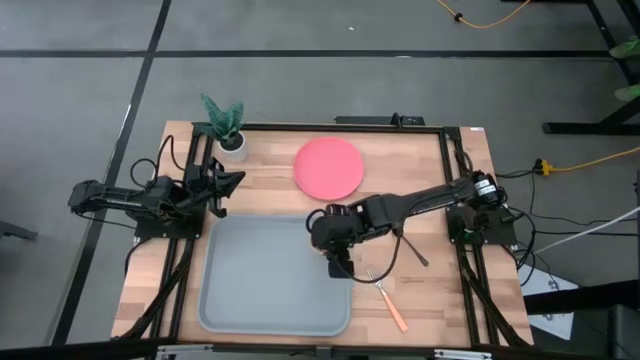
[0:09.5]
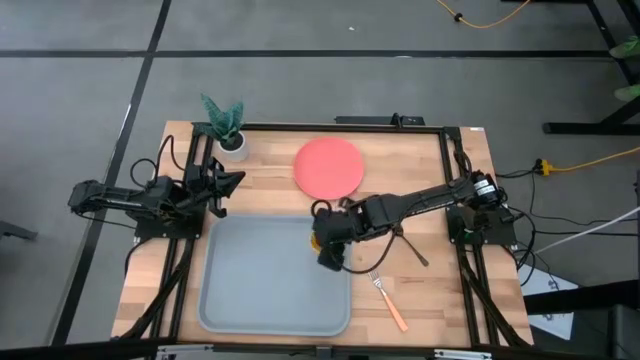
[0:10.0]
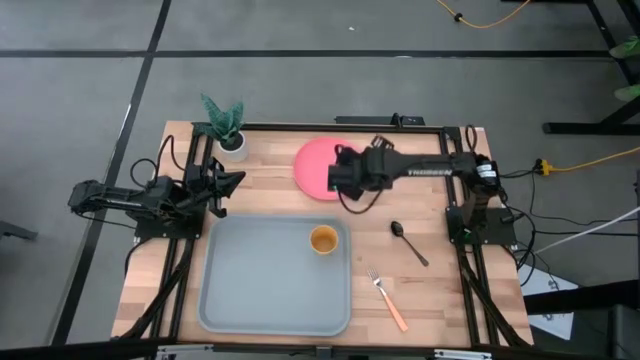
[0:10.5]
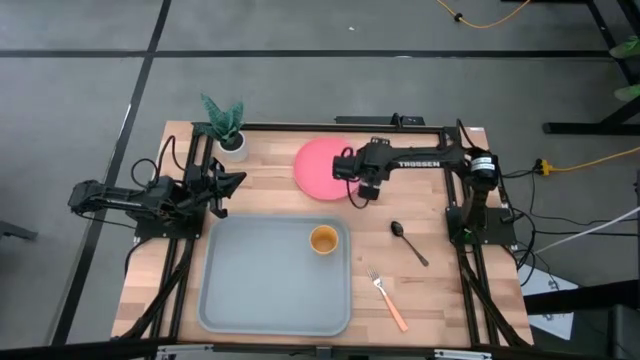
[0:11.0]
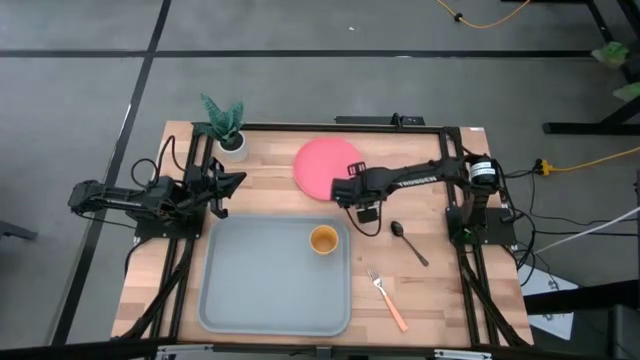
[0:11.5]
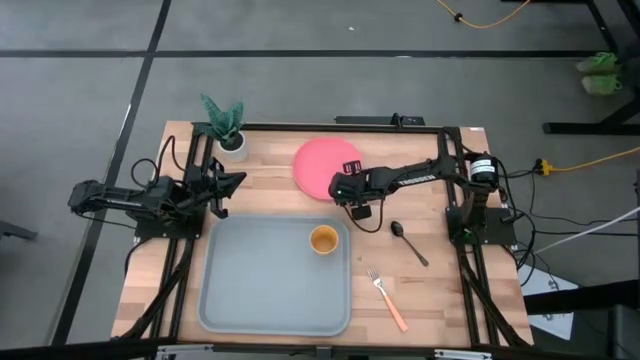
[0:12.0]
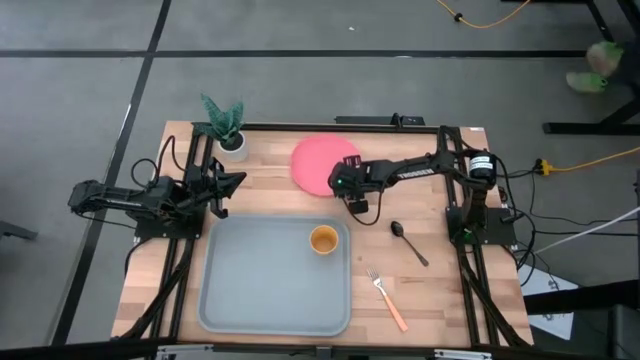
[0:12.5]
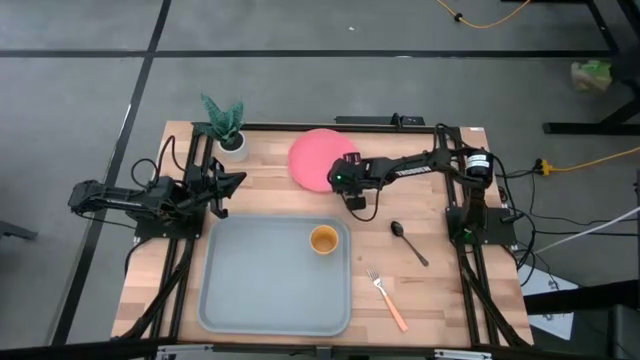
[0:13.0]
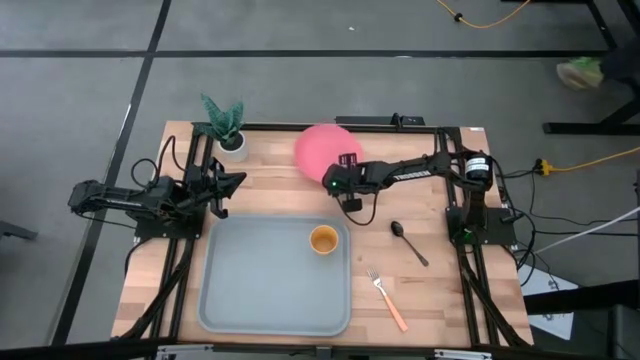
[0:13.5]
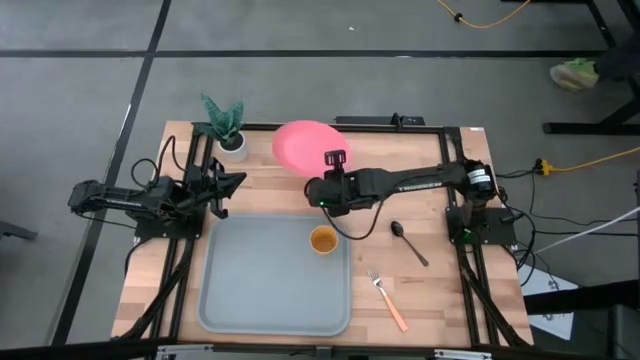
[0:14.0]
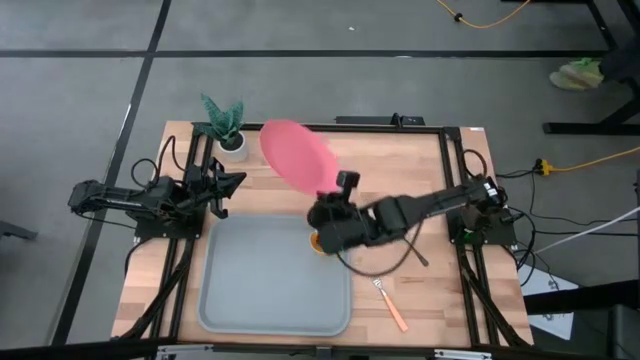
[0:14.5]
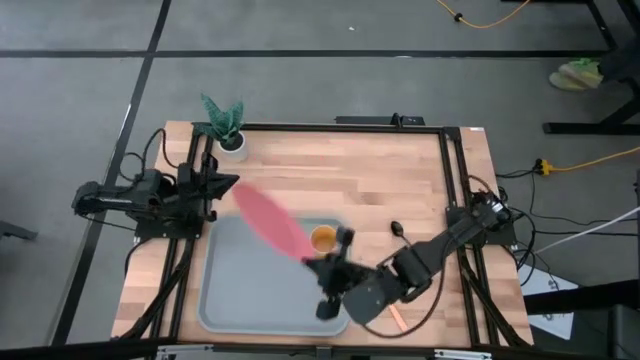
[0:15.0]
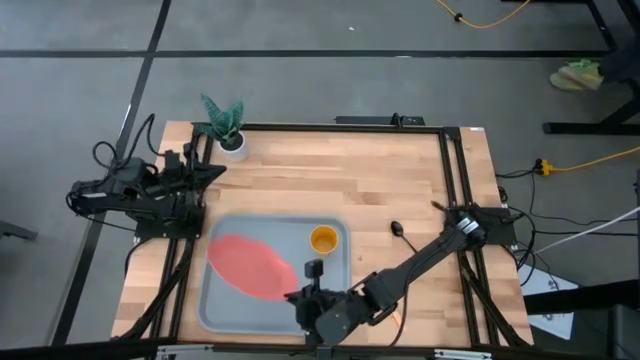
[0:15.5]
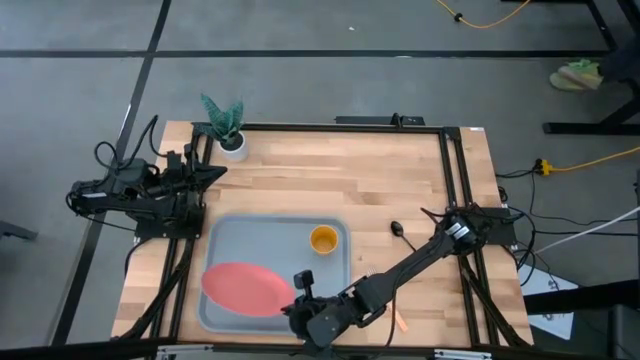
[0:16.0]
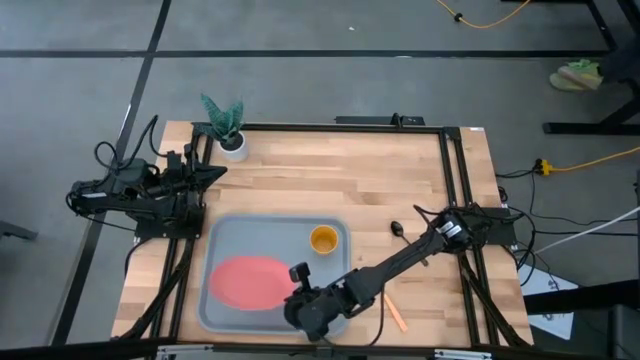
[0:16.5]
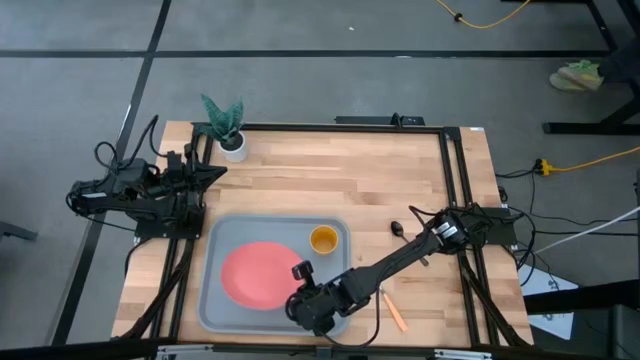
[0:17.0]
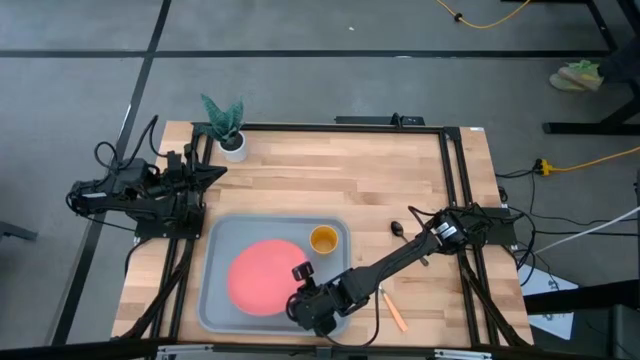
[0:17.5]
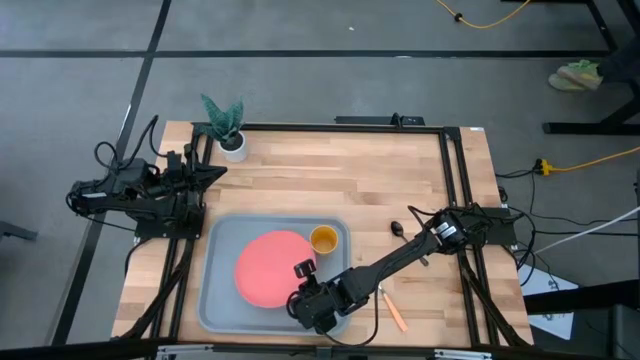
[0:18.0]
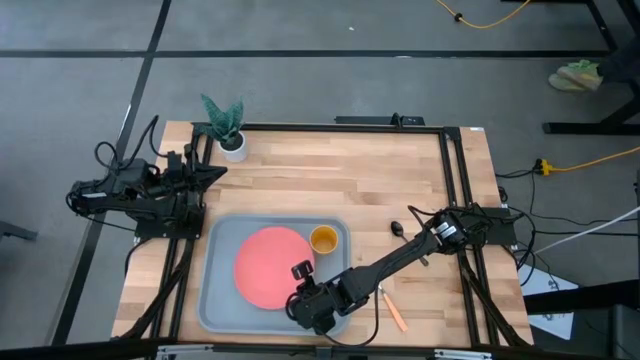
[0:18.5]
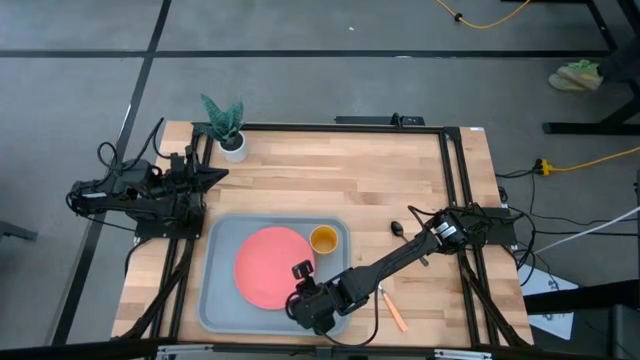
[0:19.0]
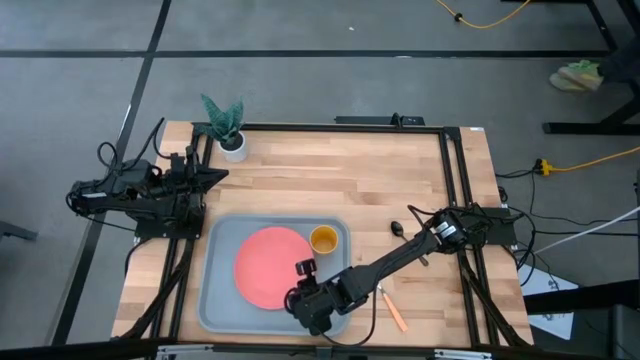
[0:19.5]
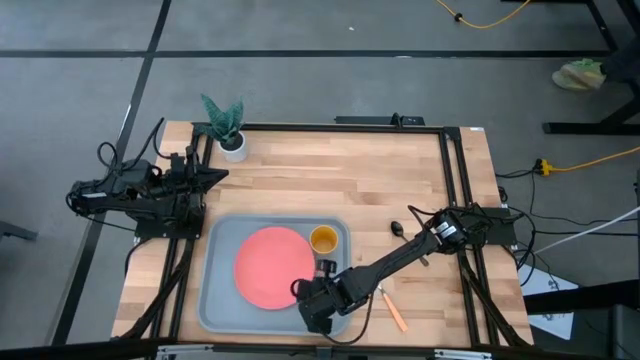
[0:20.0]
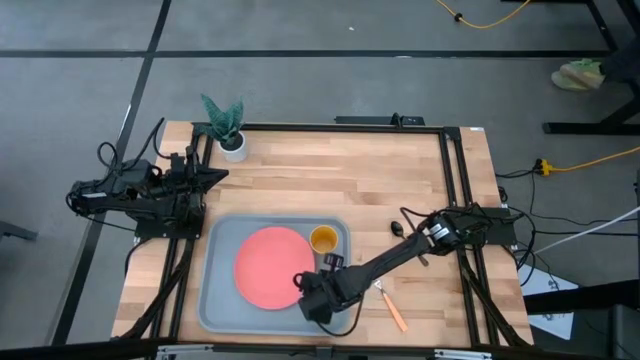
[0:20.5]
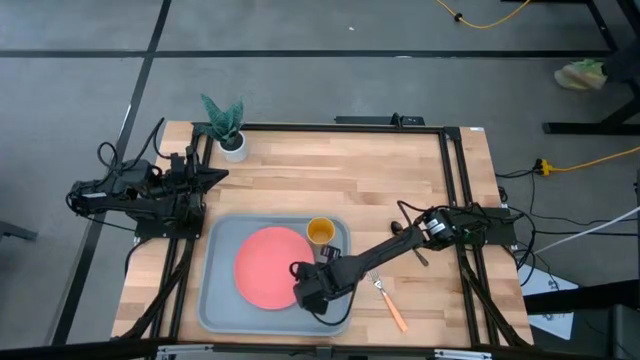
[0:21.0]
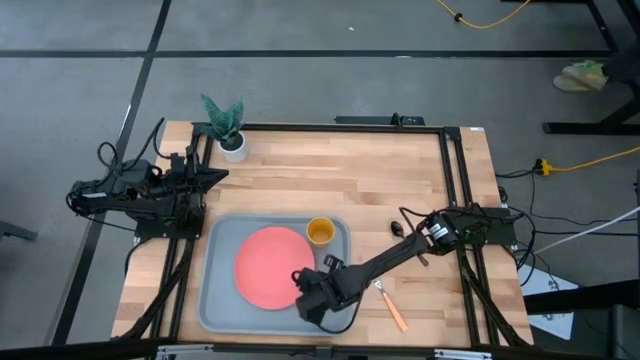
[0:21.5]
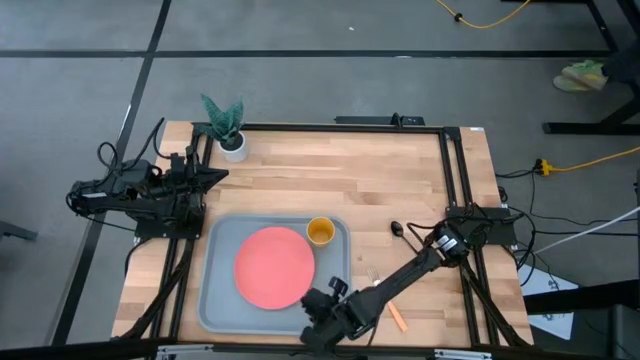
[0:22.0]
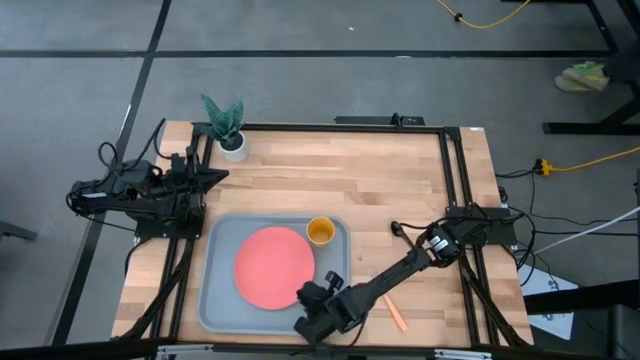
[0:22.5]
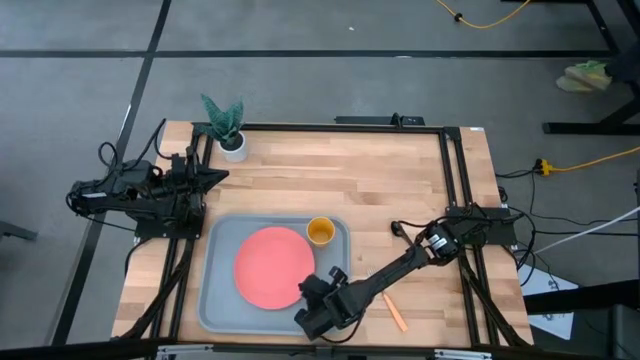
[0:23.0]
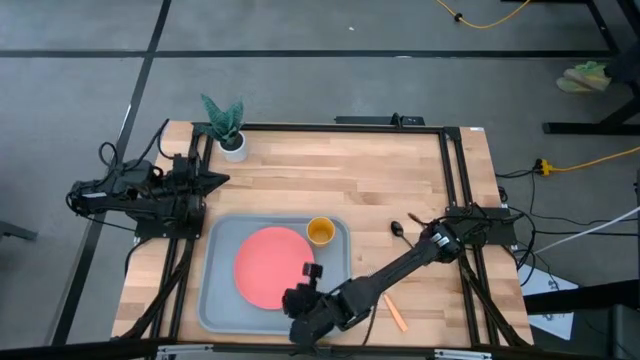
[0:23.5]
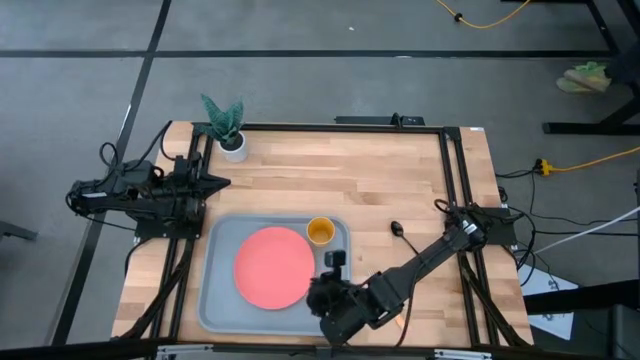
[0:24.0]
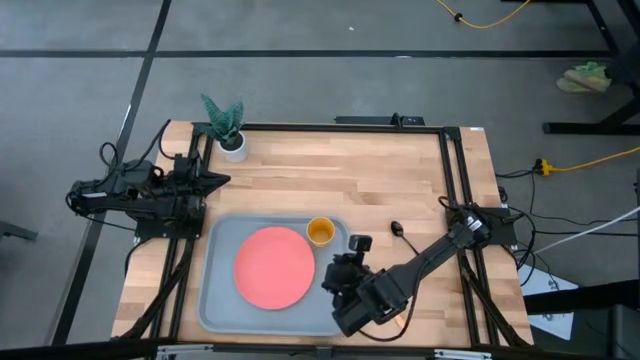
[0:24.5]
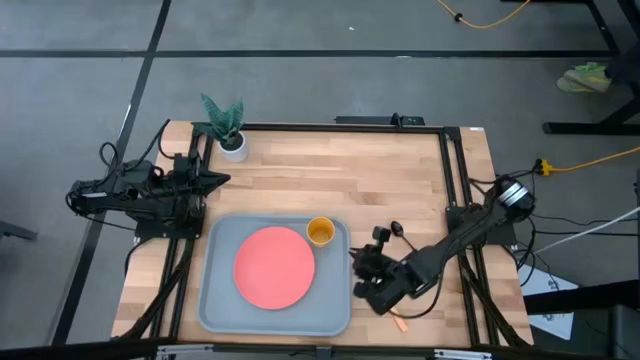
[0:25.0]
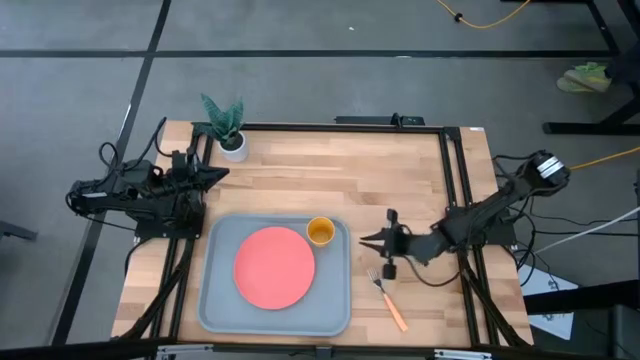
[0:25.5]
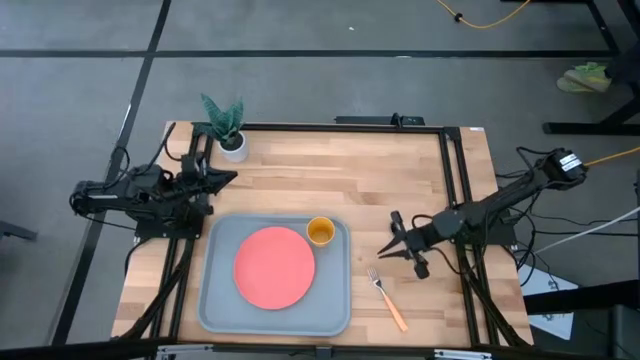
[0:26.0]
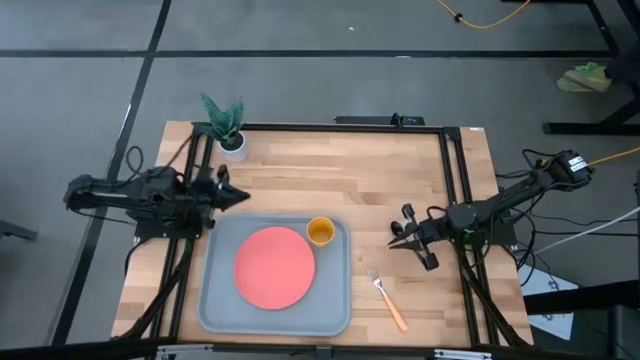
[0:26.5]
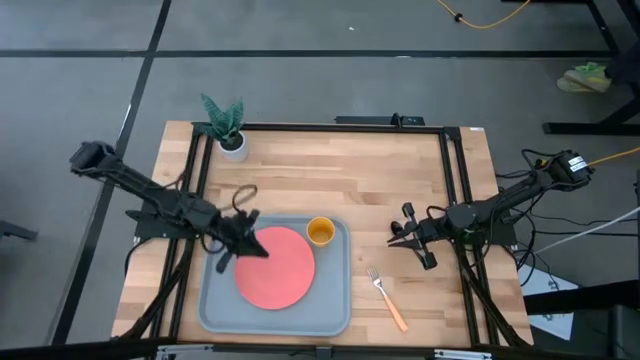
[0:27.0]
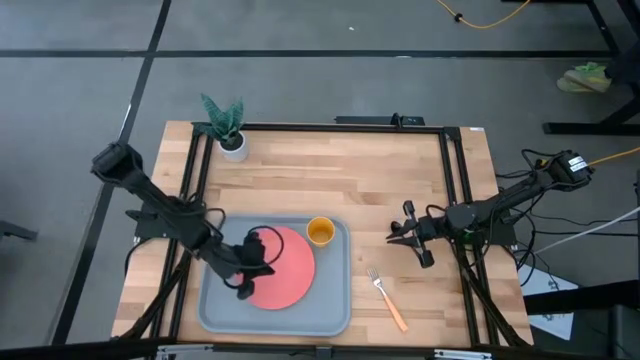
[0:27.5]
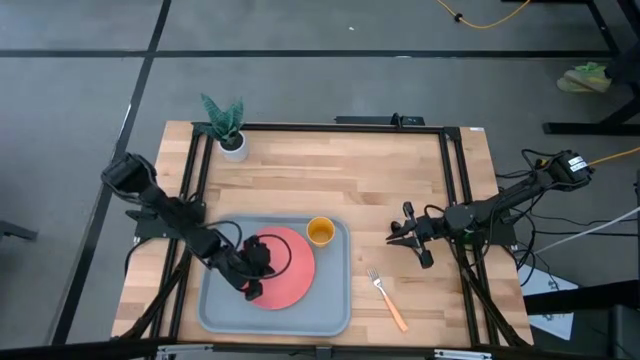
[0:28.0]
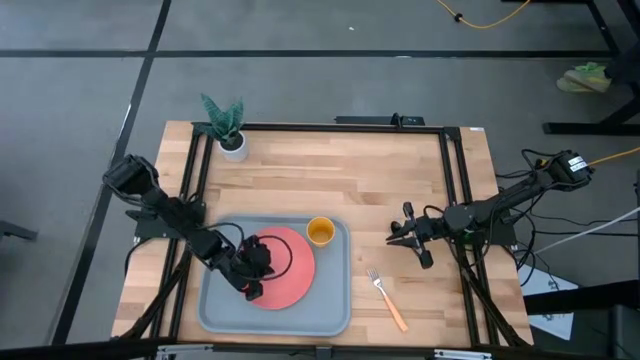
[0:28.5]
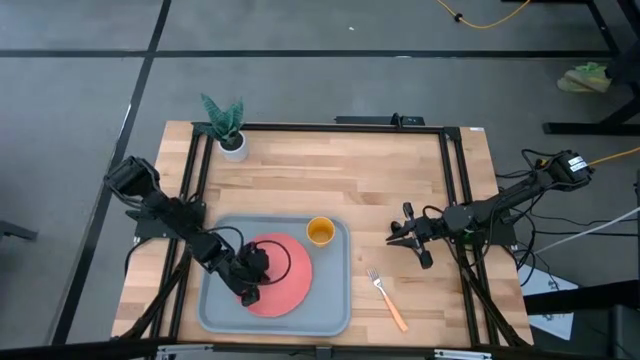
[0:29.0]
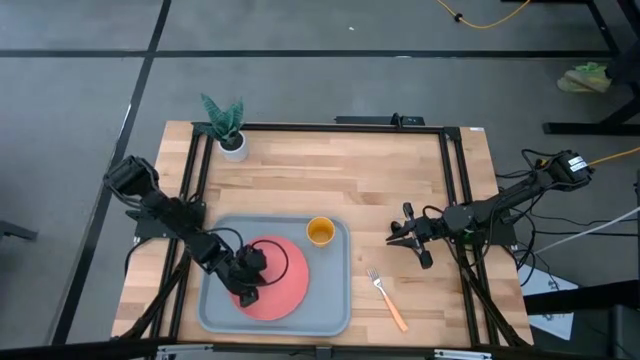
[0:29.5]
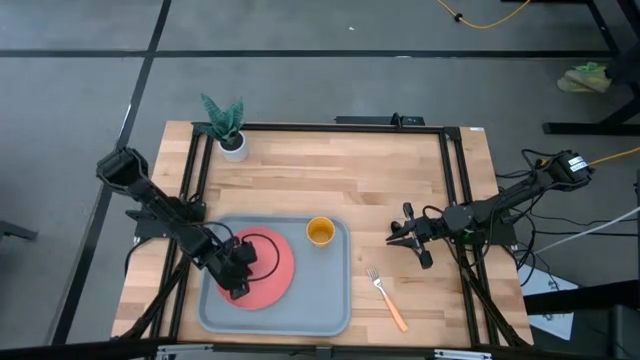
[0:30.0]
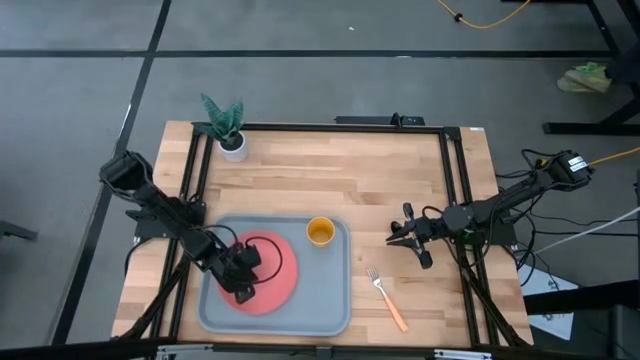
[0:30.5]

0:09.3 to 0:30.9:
Task: Pick and place plate/cup/fork/spoon on tray
Put the pink plate on the gray tray
